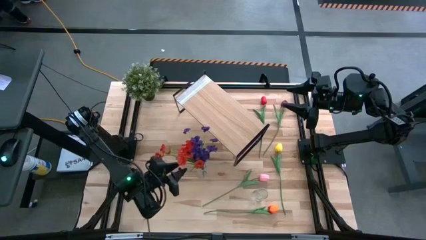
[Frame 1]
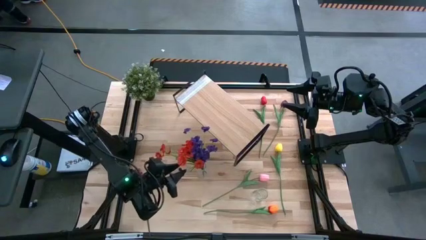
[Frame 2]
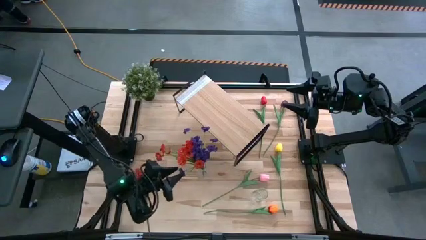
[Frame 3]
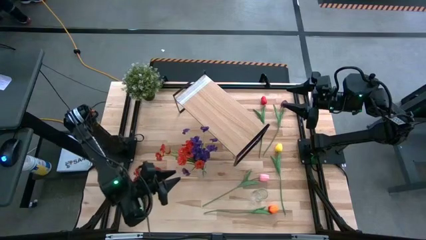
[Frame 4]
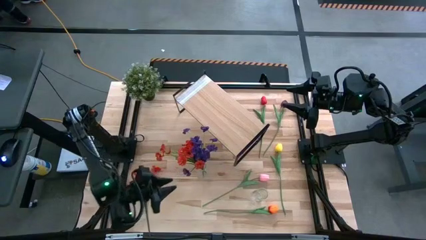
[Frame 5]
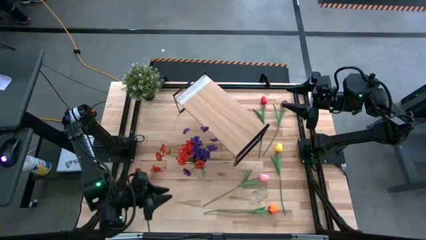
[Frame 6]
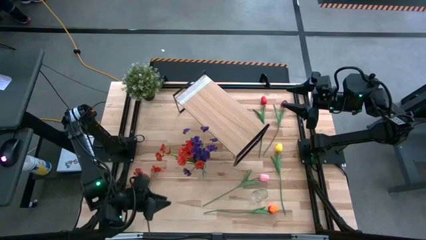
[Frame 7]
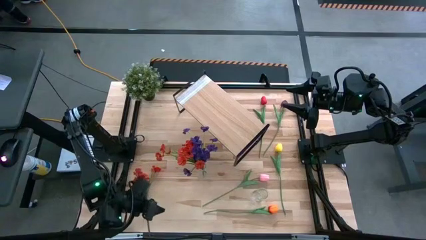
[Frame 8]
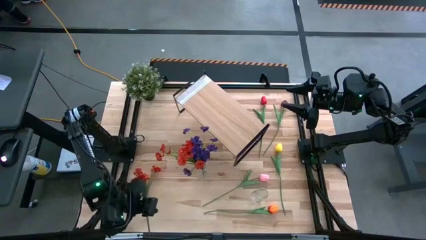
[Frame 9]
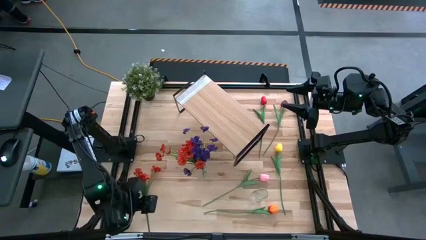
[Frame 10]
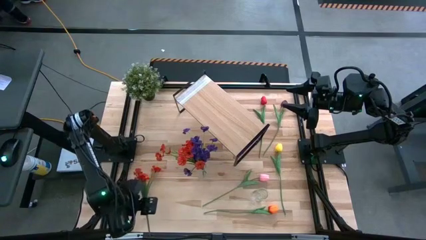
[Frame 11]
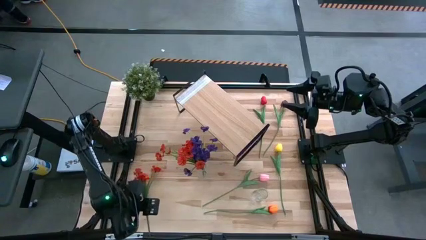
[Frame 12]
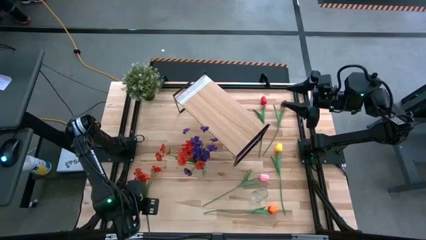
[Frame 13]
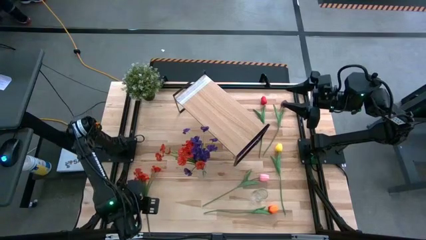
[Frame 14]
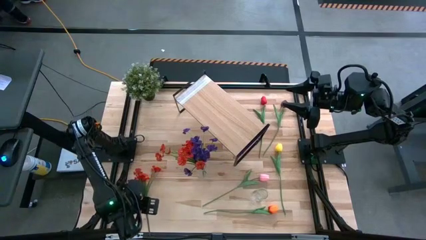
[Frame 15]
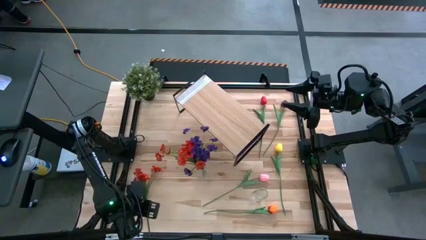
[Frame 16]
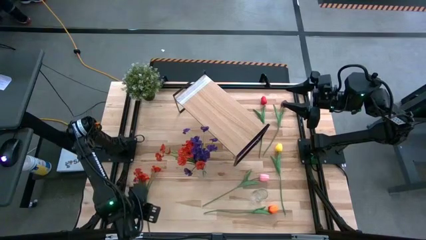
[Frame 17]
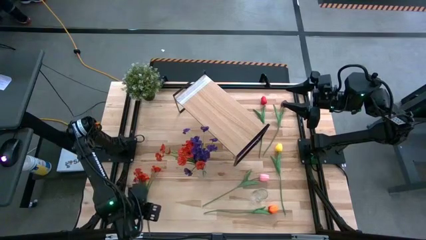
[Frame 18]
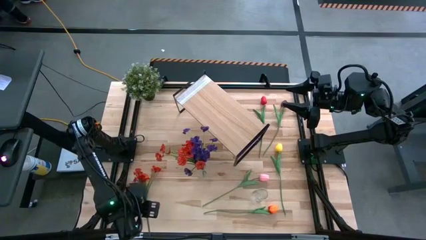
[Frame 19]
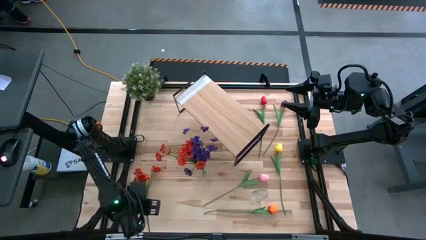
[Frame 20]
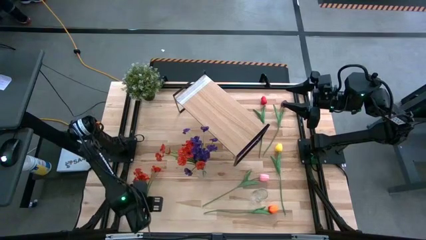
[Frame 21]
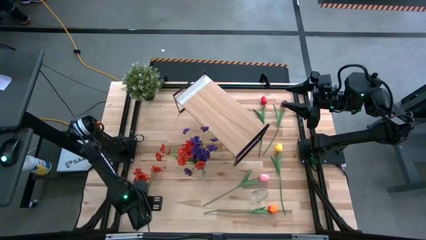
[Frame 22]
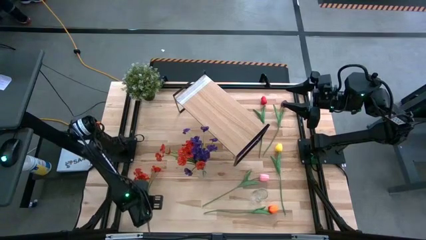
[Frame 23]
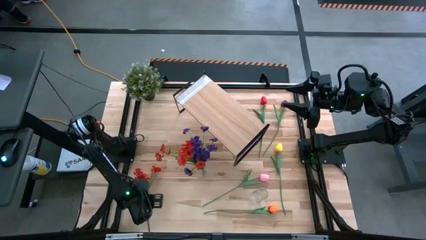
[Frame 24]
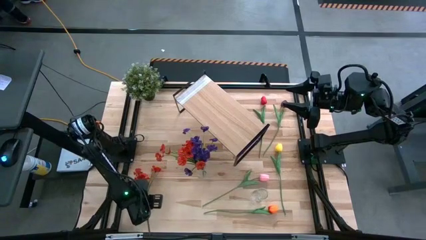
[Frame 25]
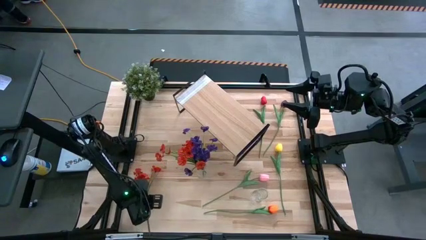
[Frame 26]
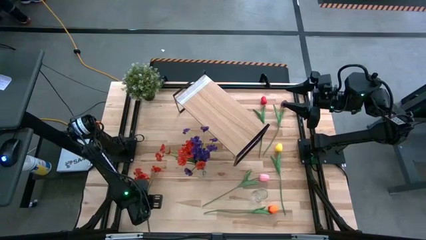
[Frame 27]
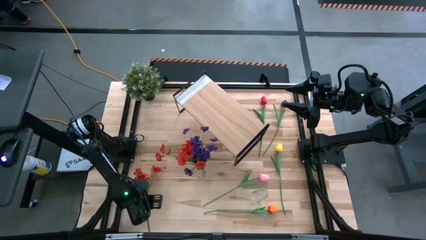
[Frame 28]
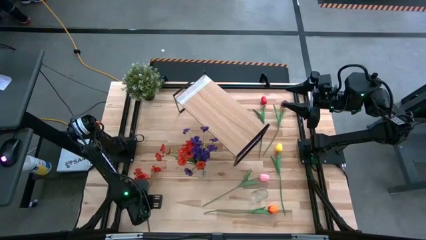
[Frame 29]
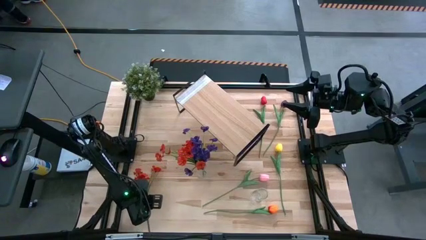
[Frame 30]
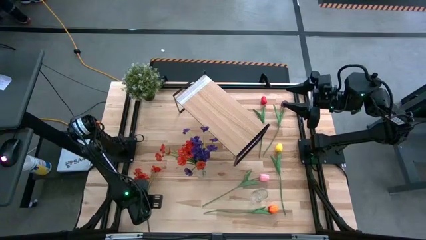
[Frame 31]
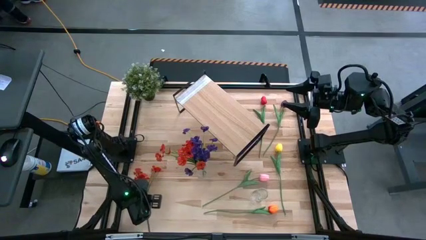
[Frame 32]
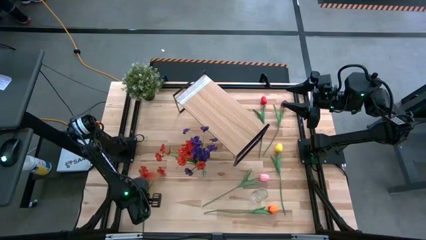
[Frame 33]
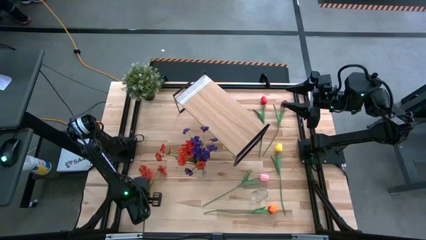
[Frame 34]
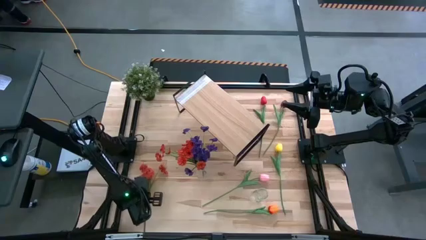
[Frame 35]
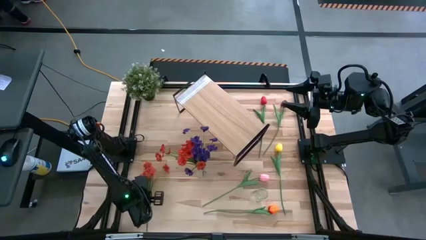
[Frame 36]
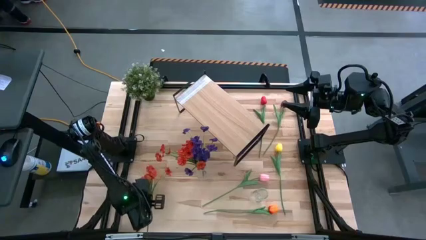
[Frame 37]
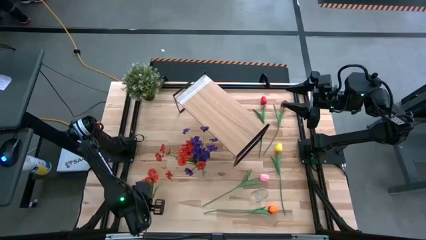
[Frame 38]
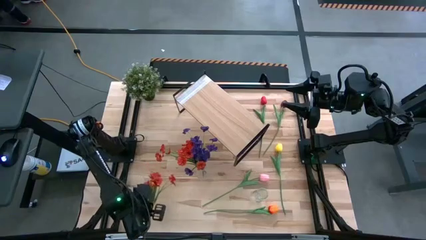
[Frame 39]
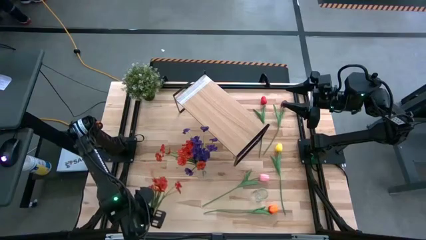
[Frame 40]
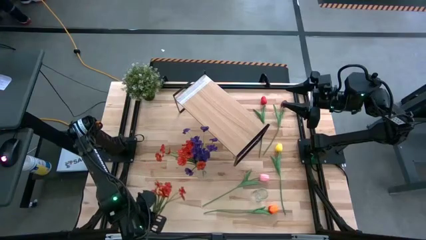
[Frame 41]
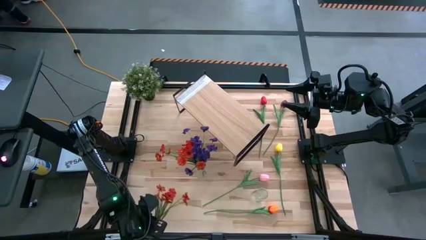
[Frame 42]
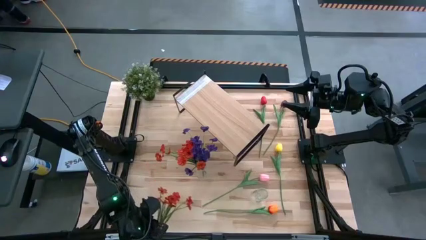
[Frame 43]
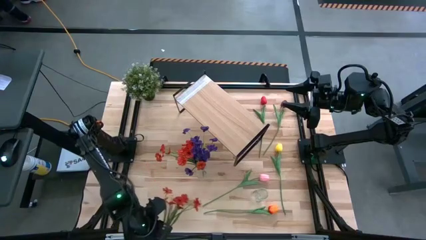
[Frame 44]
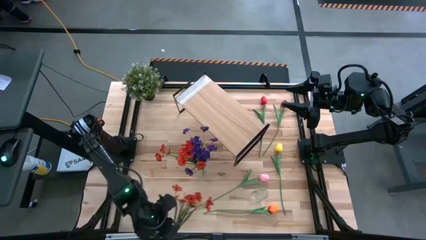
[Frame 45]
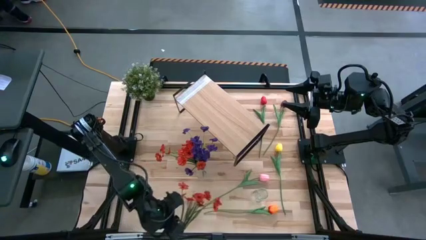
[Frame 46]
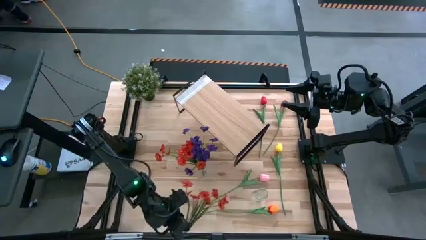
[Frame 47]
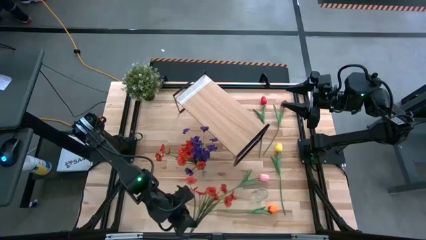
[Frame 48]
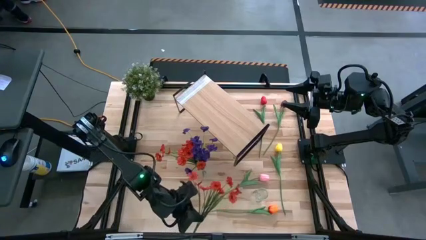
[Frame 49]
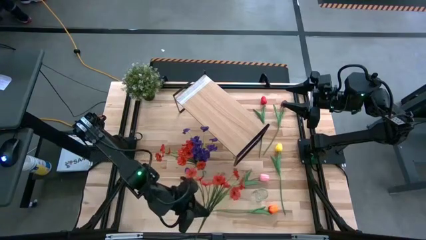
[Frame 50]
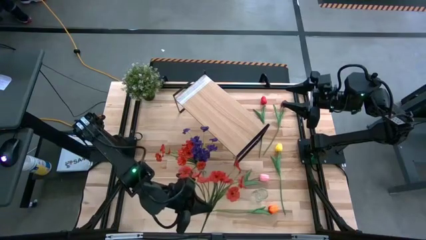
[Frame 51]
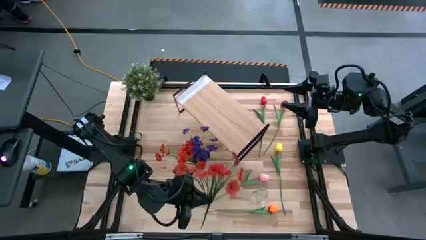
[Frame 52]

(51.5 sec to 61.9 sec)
Task: Pick and place flowers into a vace then onto a shelf
Put the orange flower into the left transparent vase
